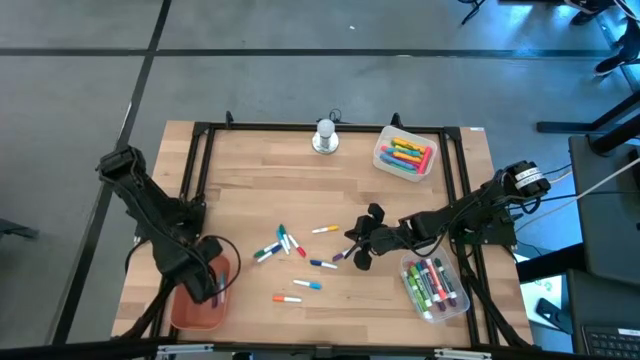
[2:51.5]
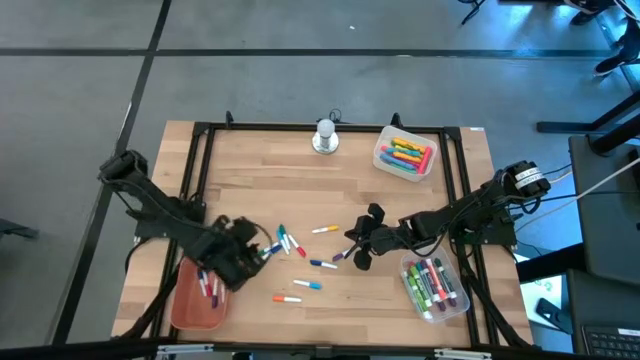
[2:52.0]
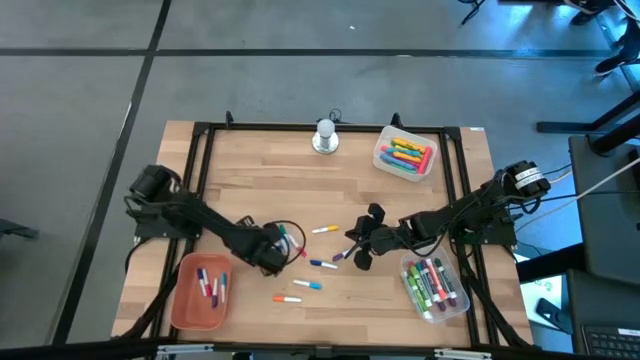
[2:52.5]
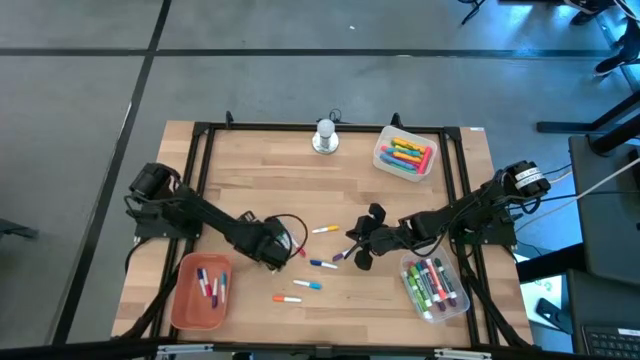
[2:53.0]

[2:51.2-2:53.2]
Task: Pick & Place Markers
Put the small green highlighter pen into the orange bin

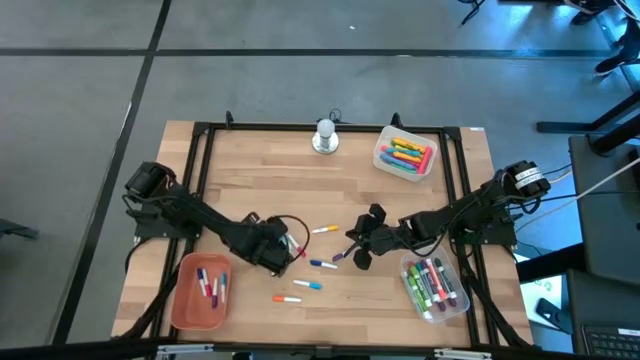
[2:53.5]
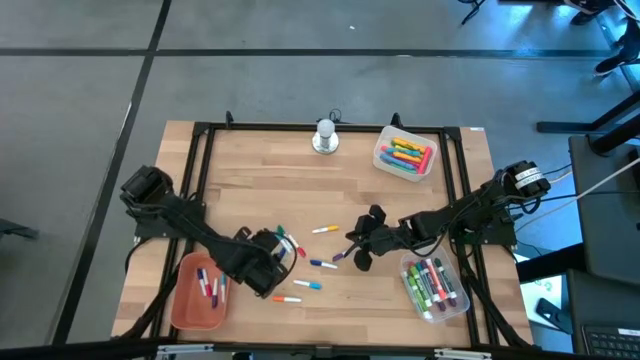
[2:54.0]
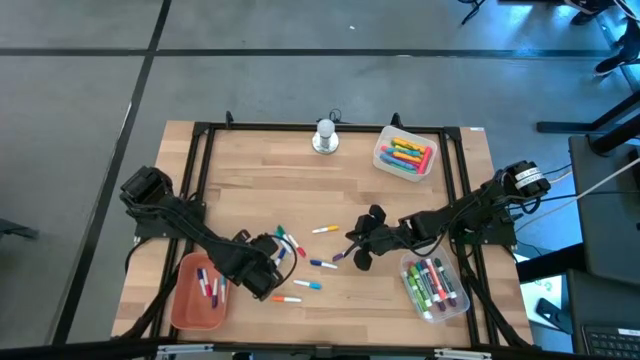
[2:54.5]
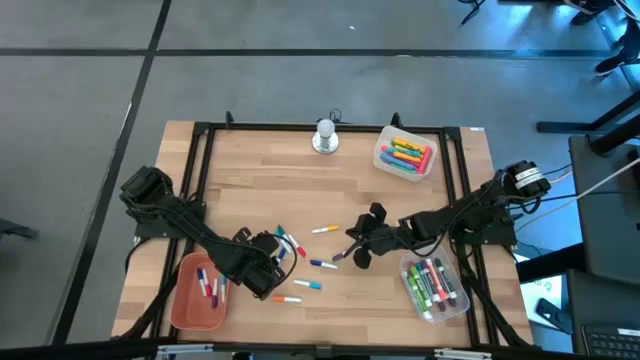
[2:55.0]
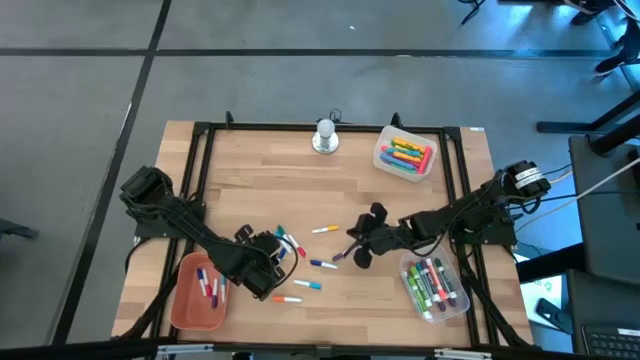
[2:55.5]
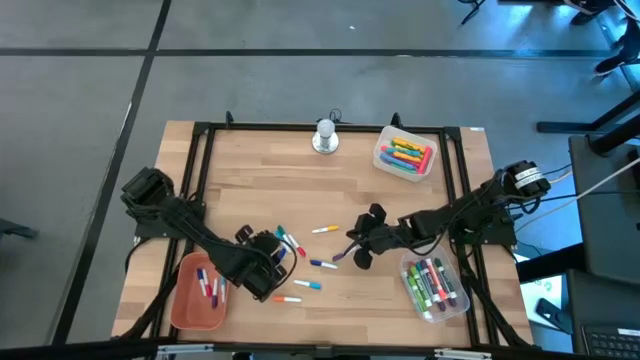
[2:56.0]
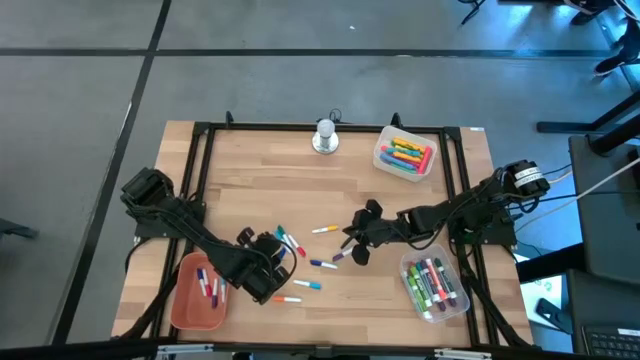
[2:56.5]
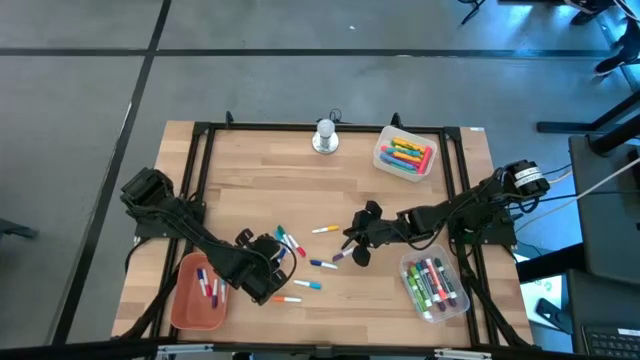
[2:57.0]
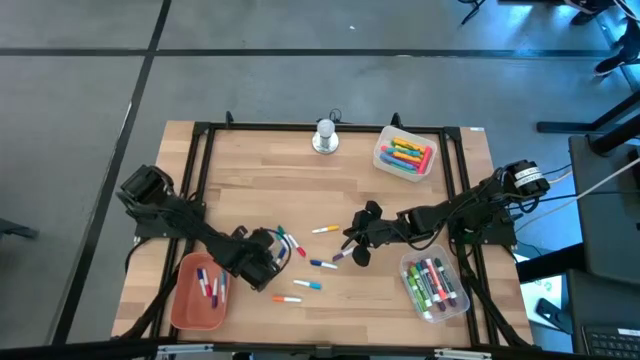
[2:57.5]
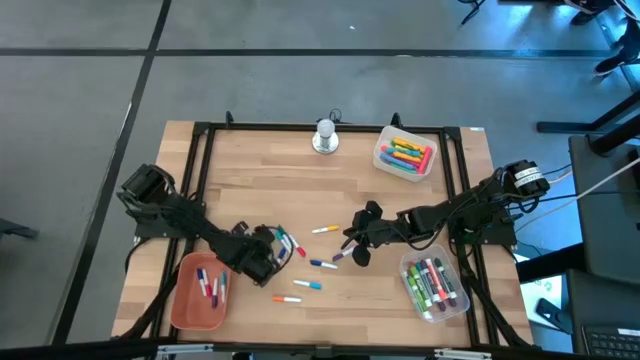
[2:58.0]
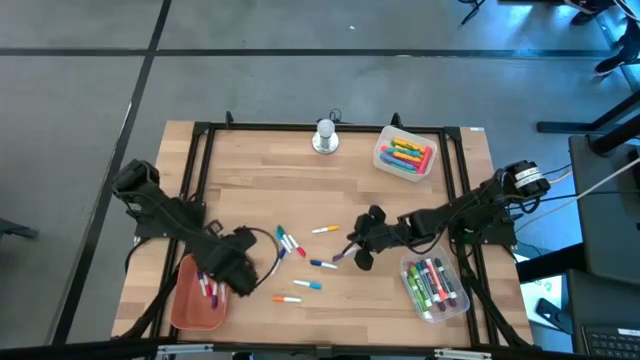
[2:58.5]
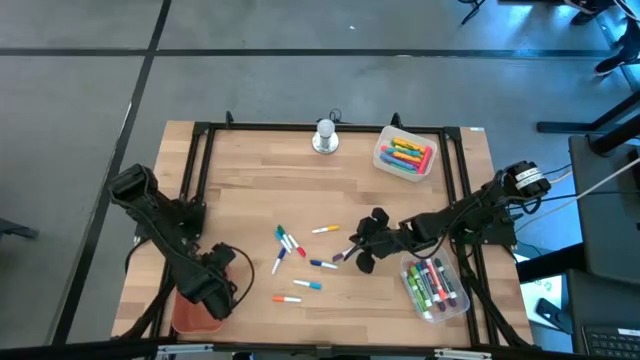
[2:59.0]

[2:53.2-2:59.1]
Put the small green highlighter pen into the orange bin

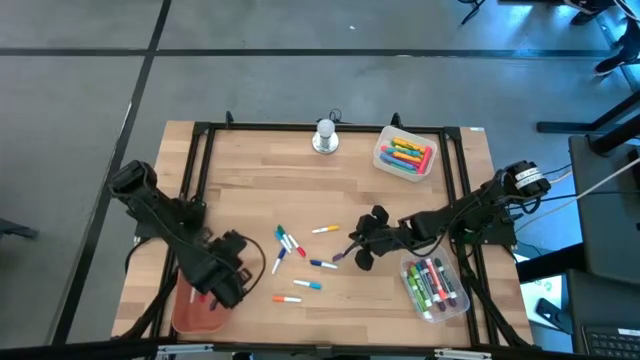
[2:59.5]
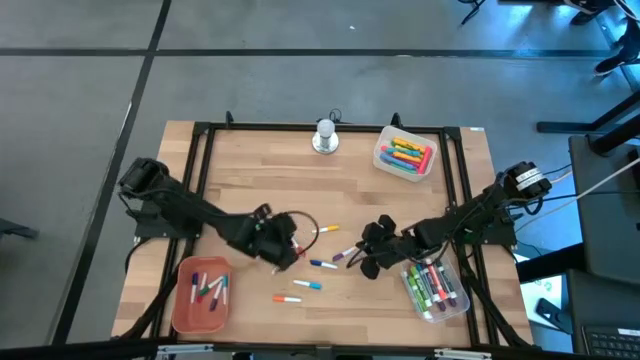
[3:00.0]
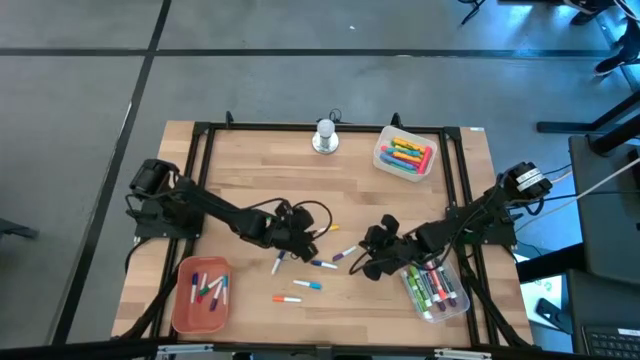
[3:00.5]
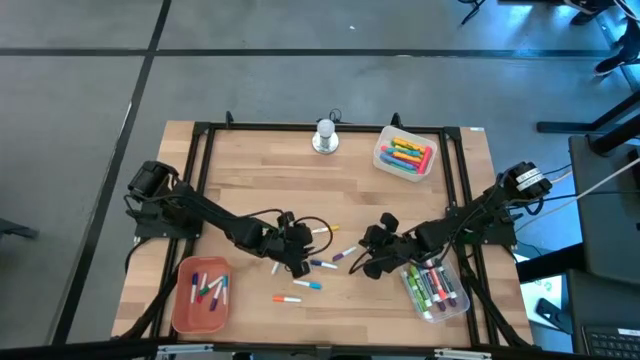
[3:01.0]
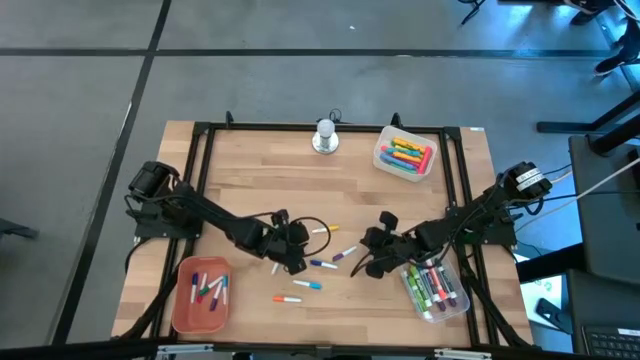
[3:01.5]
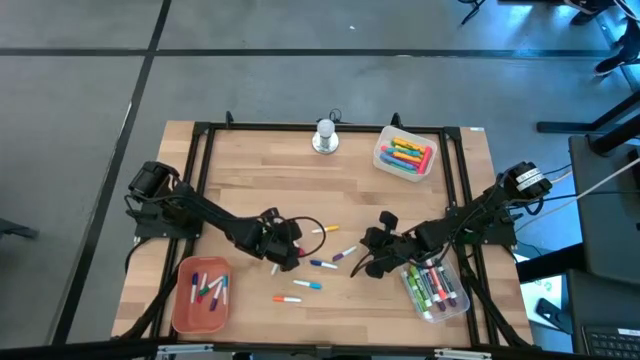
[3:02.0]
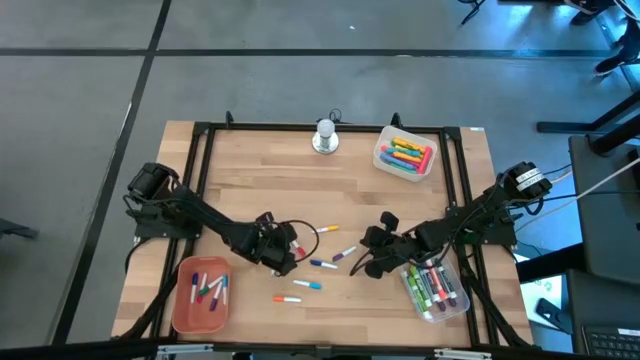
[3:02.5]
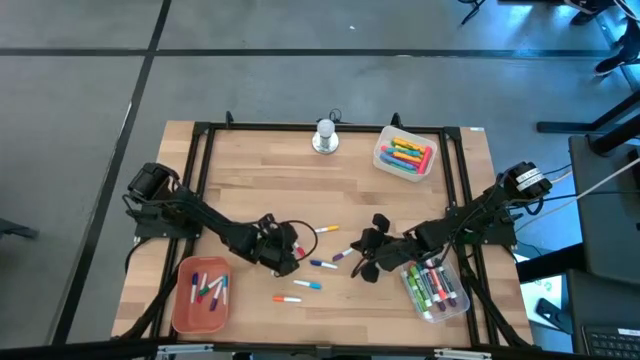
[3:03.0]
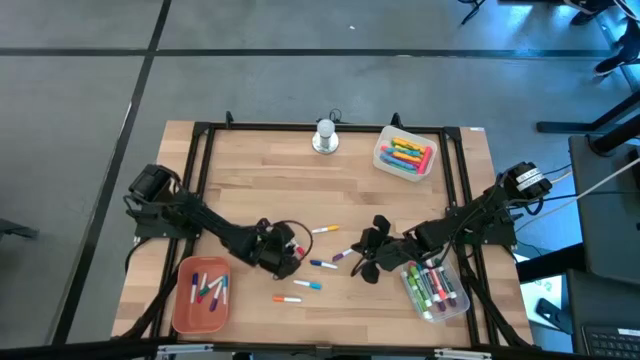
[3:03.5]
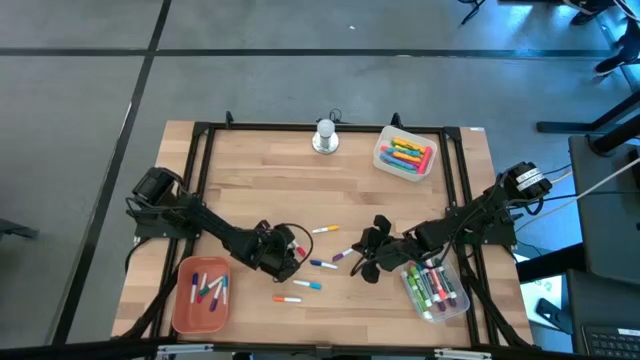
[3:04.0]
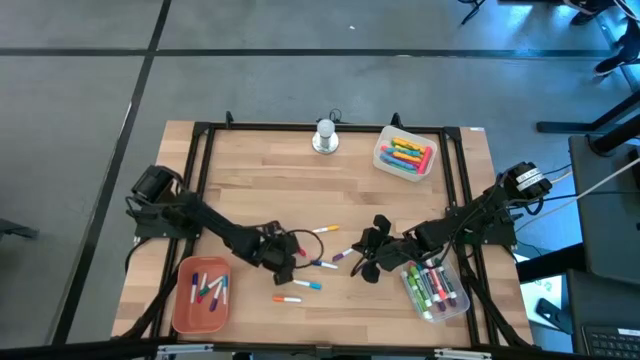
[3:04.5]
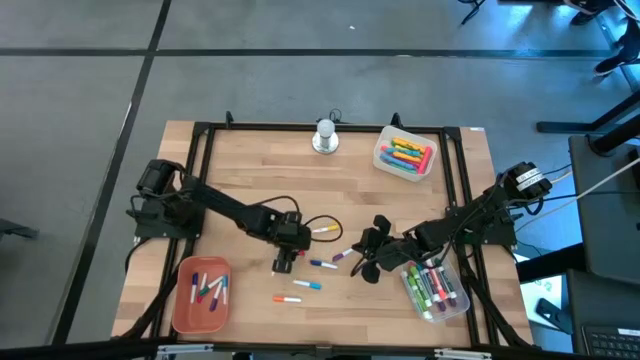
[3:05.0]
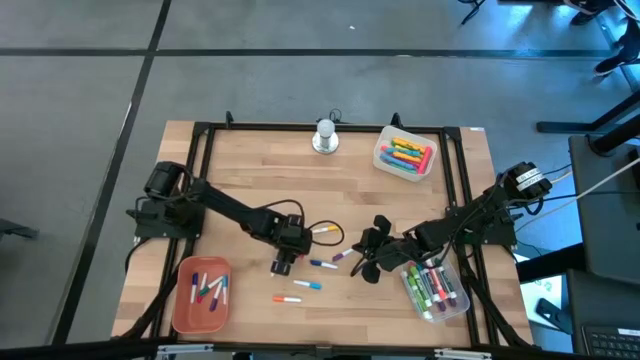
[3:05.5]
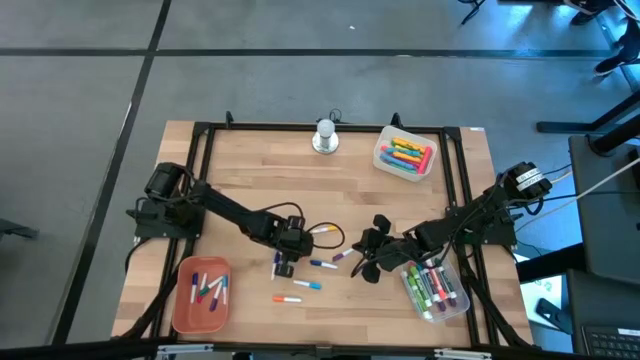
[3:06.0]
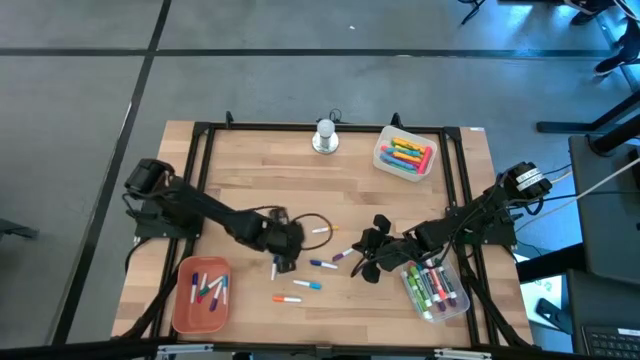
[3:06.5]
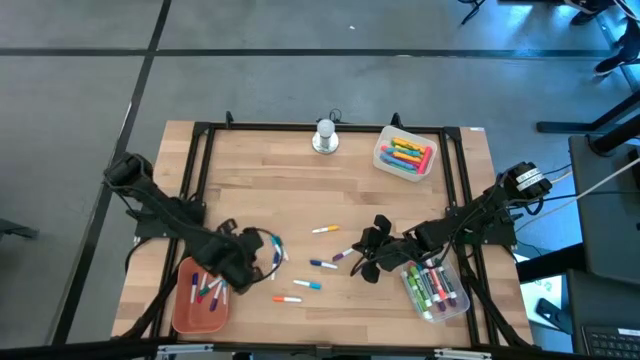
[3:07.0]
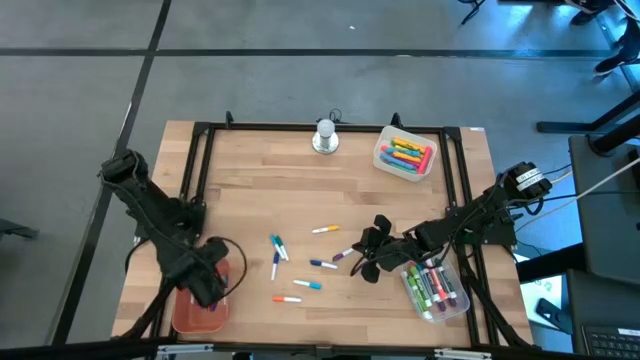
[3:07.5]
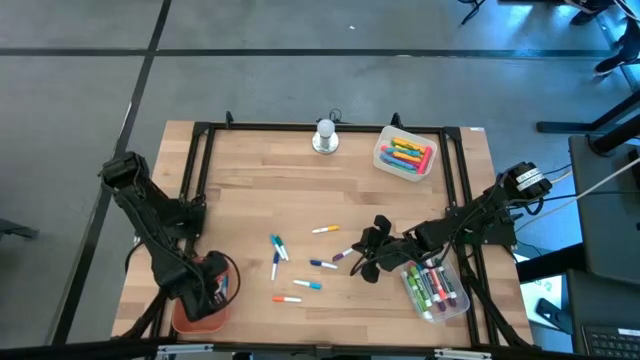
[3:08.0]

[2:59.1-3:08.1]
Put the small red highlighter pen into the orange bin

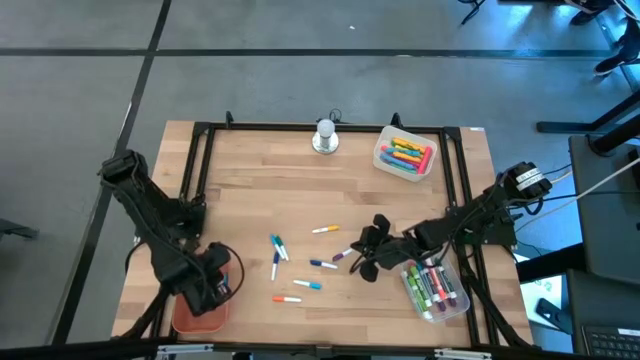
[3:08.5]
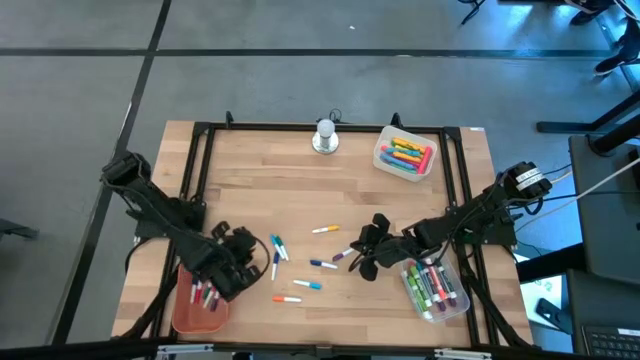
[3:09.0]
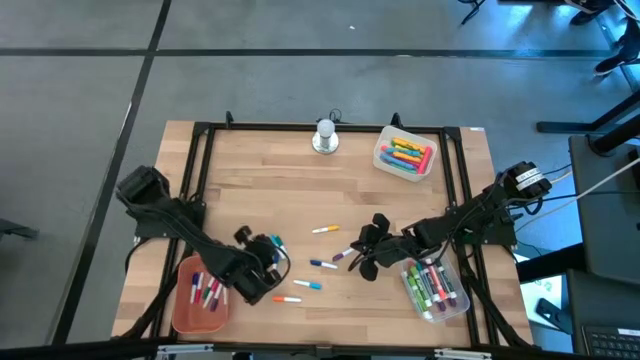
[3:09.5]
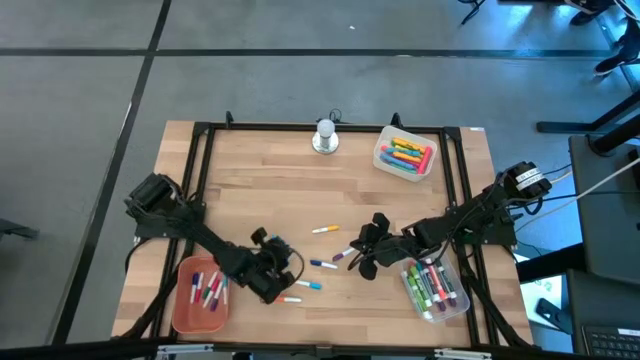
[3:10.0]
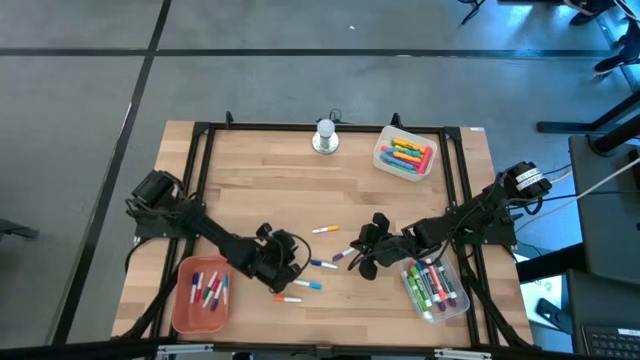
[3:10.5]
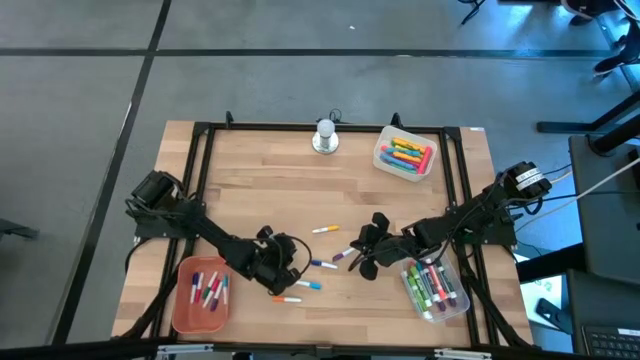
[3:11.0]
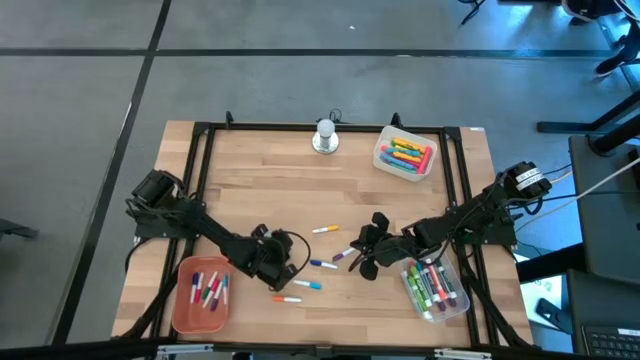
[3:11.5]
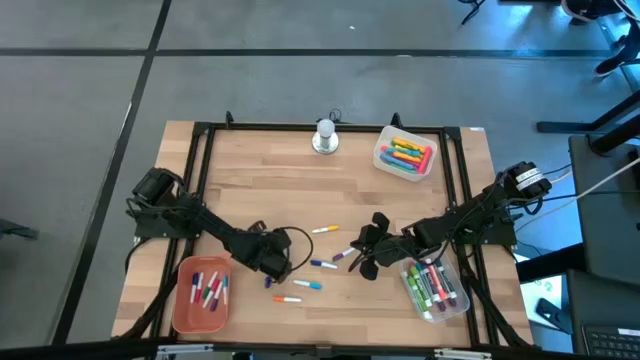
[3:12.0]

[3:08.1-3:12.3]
Put the small light blue highlighter pen into the orange bin
